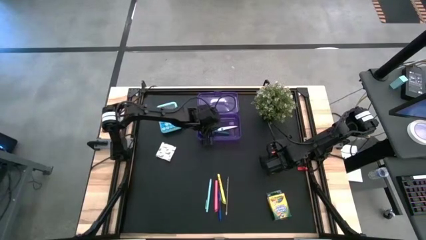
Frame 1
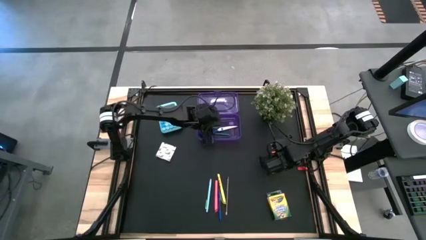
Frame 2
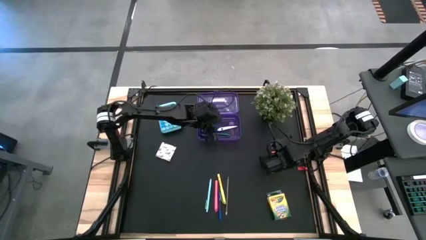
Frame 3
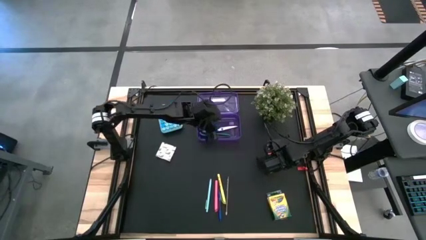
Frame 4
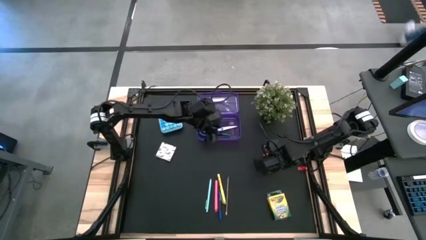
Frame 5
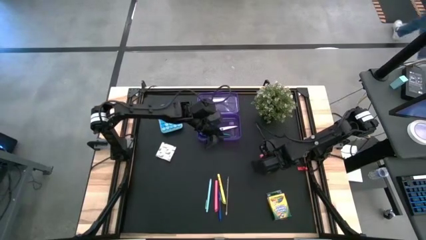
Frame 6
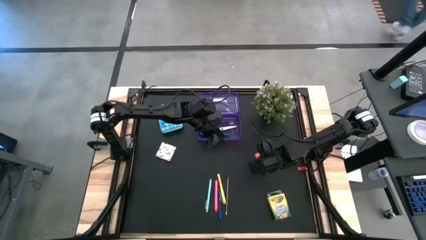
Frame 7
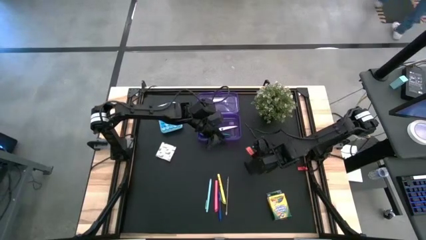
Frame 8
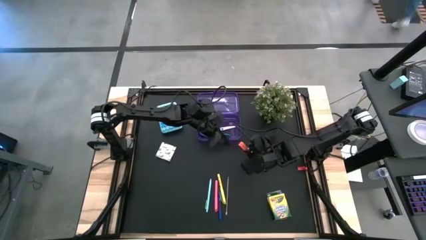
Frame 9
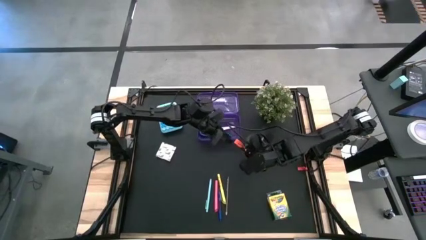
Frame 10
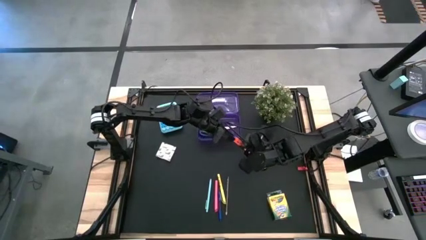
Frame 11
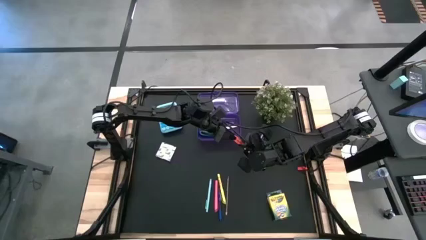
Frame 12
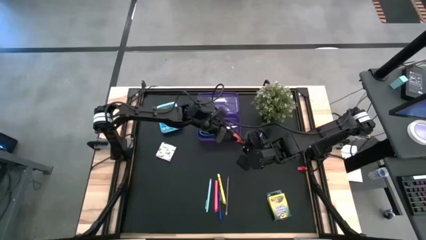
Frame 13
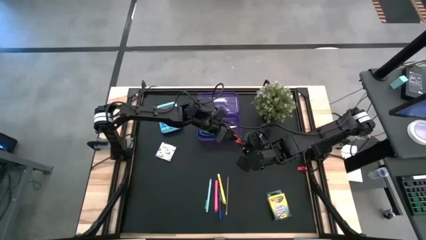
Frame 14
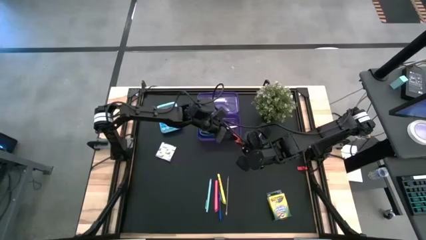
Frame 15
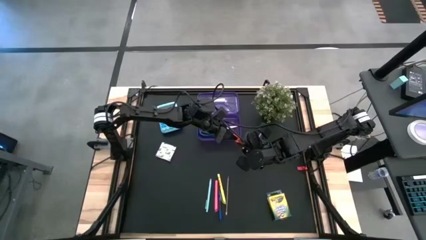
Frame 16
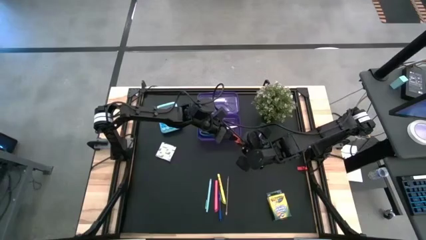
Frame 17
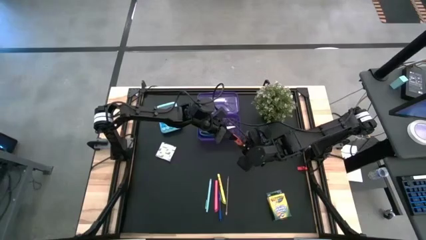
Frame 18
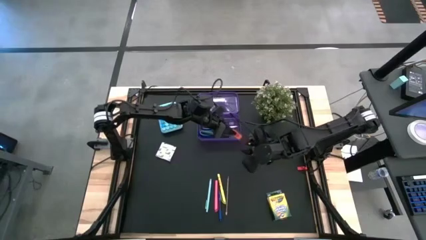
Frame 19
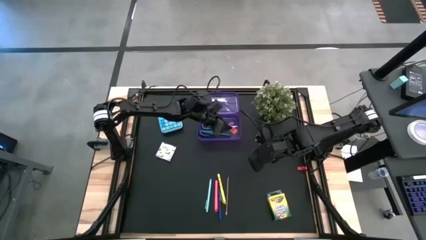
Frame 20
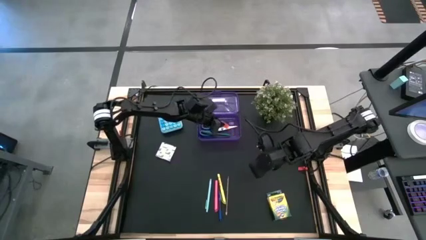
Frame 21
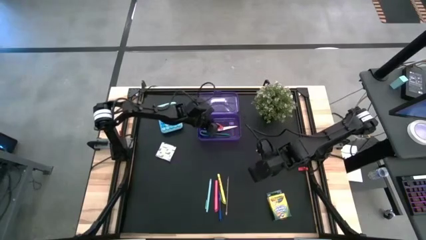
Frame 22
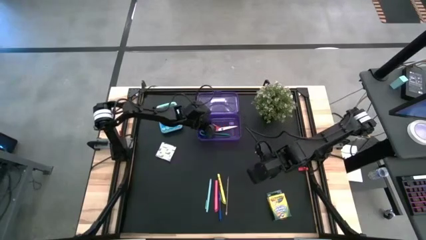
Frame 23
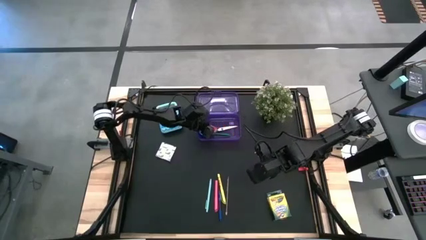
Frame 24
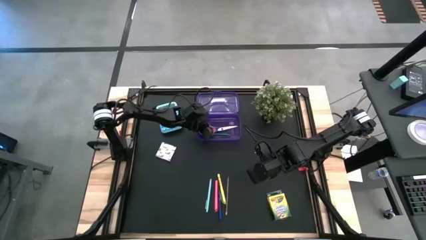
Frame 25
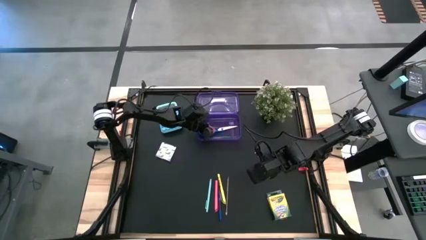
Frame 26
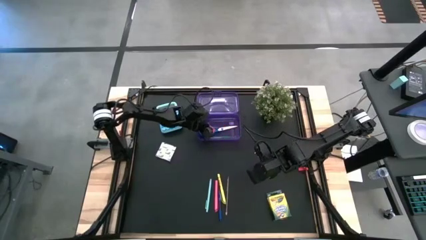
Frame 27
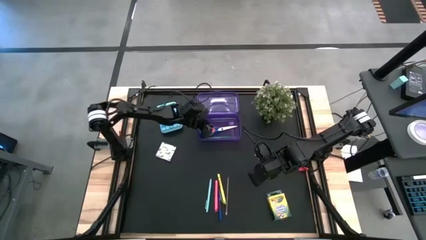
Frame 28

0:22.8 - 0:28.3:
Task: Pack school essentials
Put the orange eraser into the purple supply box

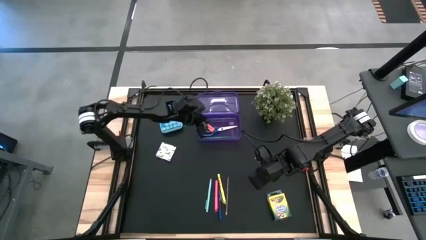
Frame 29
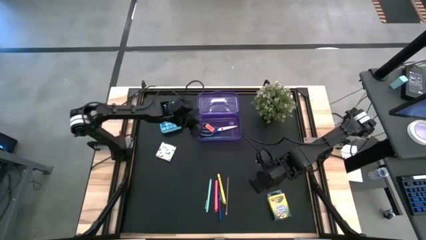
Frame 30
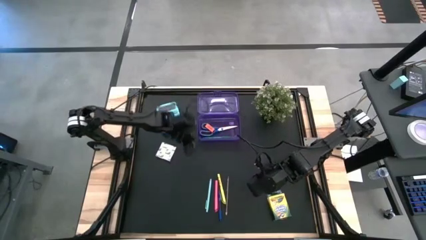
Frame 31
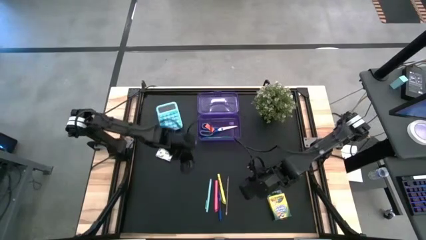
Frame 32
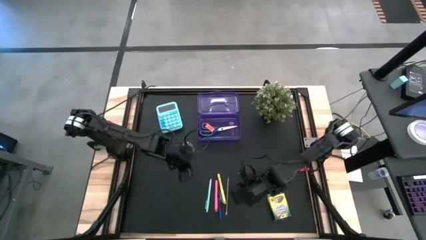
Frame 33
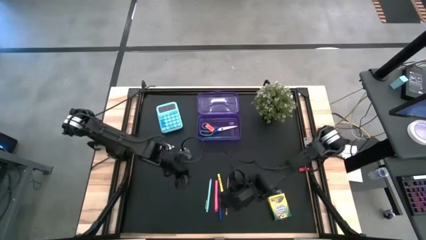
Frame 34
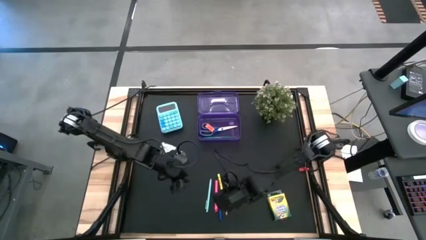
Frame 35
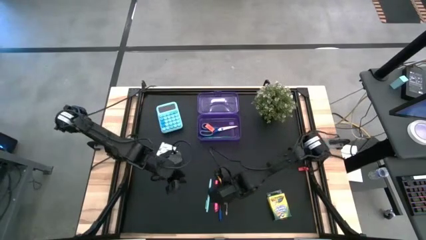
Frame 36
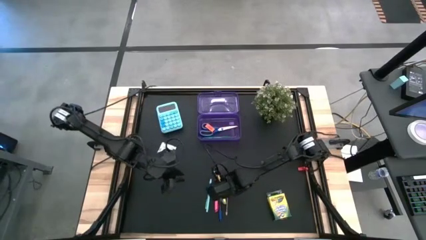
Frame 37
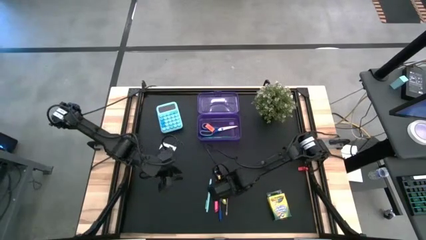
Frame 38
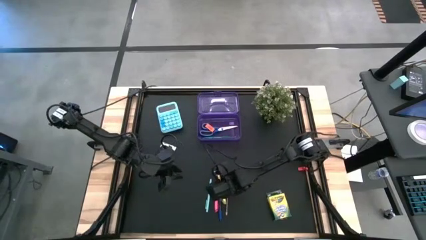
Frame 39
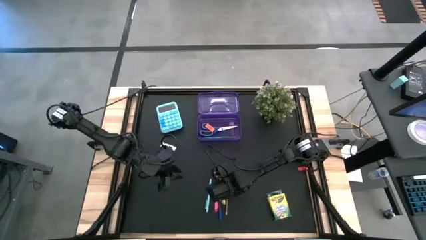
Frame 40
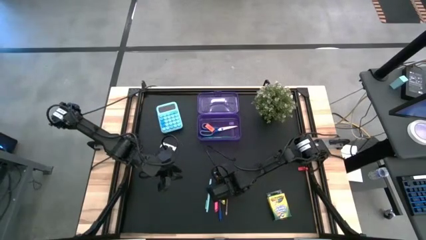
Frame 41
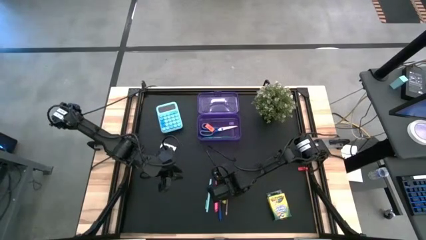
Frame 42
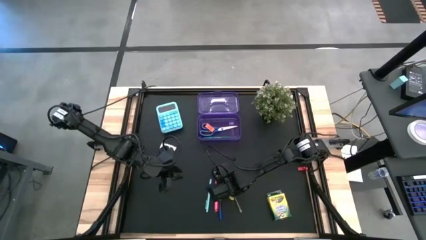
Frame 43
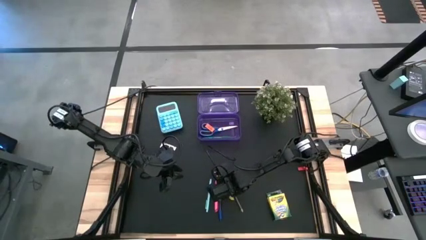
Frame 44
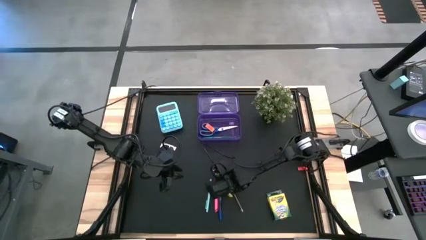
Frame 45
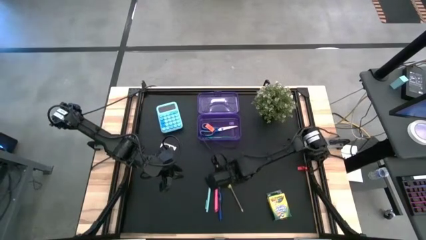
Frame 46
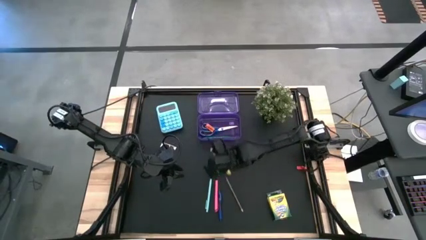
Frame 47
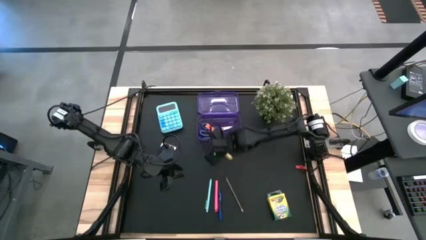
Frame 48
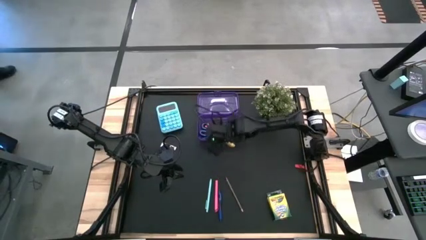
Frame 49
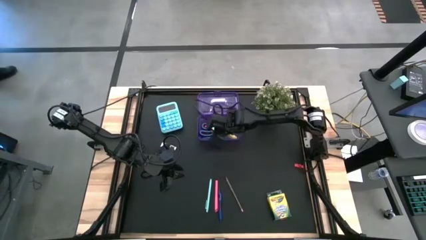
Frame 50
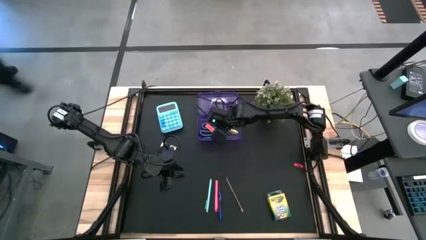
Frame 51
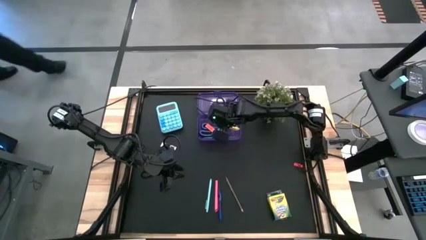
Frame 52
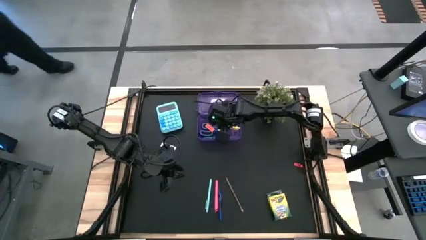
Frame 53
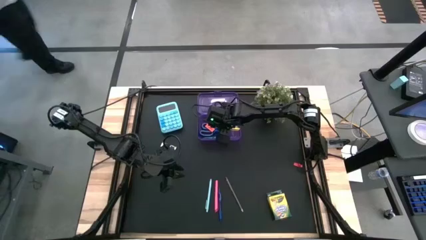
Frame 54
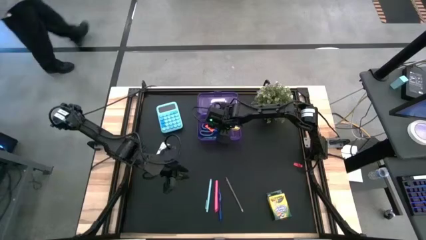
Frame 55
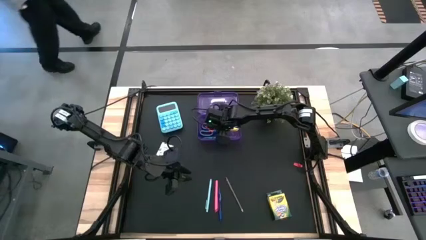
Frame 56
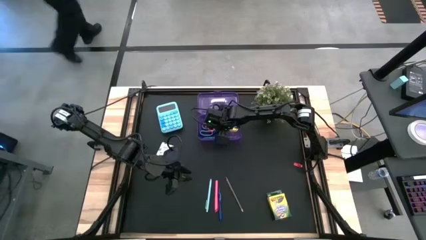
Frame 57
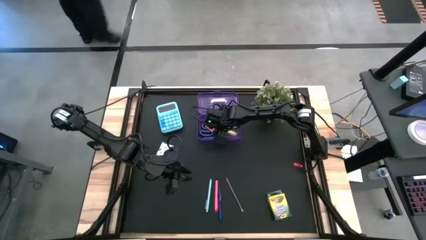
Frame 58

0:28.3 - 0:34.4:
Put the yellow highlighter pen into the purple supply box

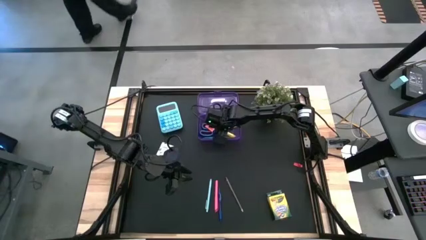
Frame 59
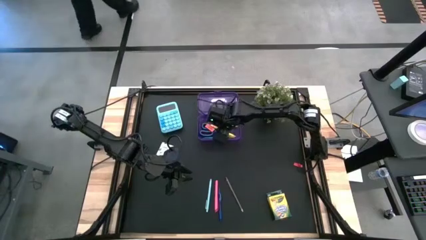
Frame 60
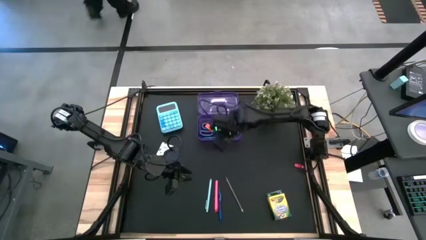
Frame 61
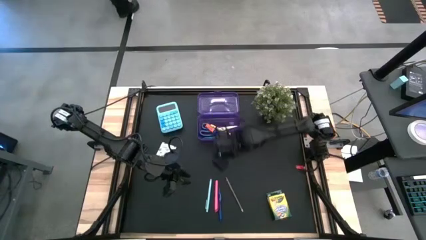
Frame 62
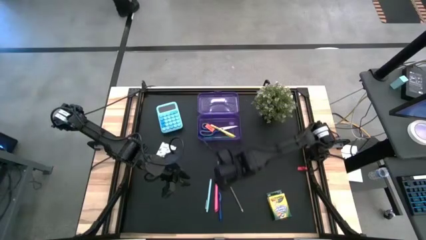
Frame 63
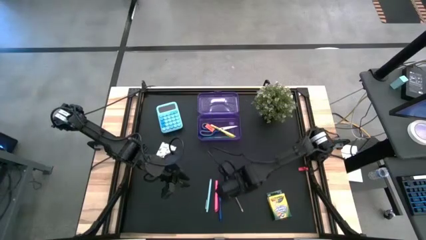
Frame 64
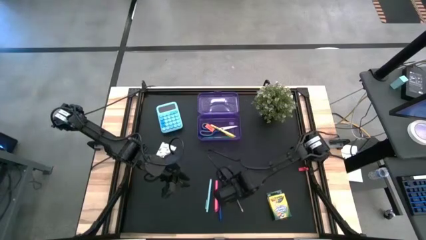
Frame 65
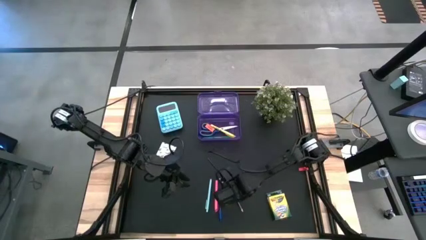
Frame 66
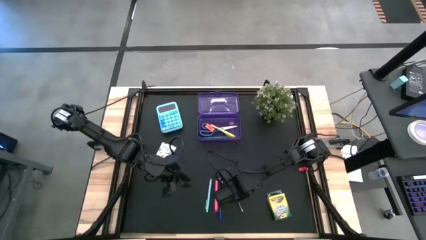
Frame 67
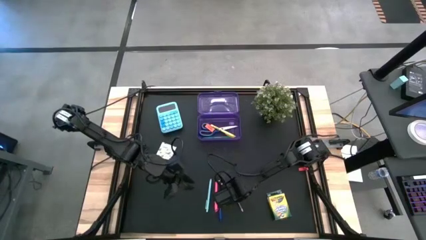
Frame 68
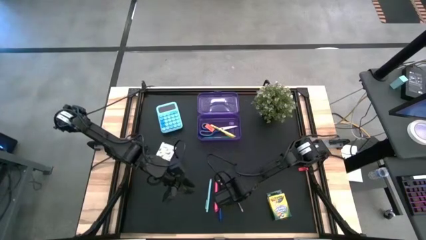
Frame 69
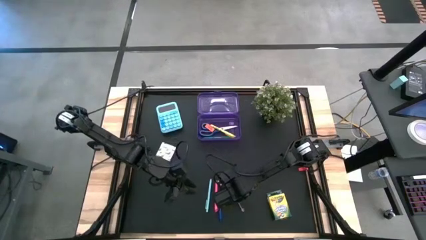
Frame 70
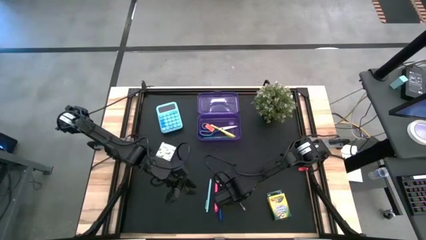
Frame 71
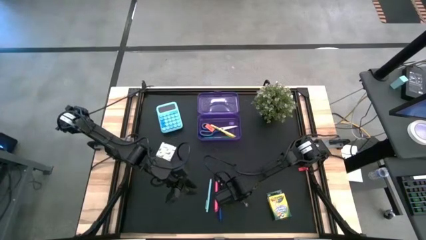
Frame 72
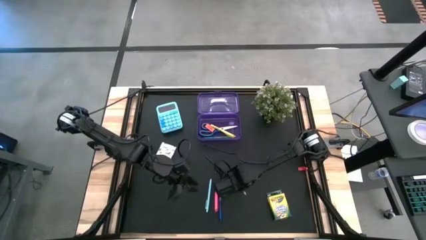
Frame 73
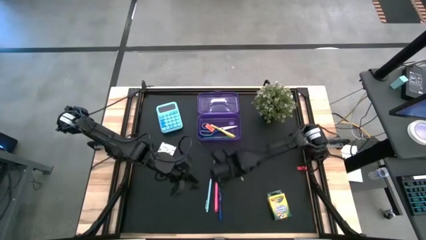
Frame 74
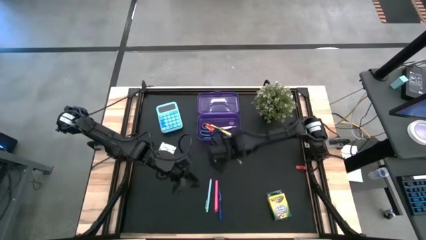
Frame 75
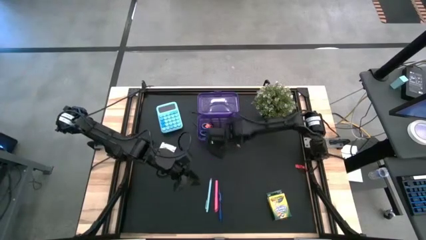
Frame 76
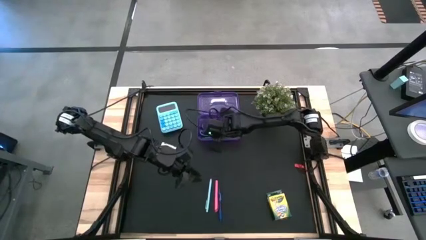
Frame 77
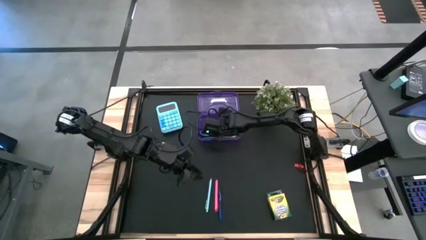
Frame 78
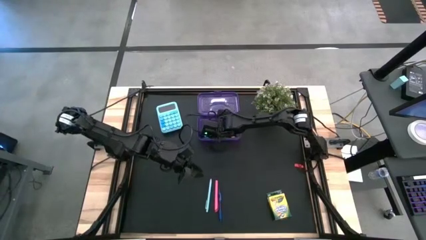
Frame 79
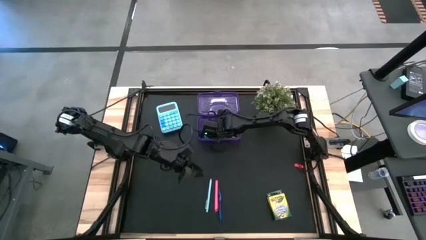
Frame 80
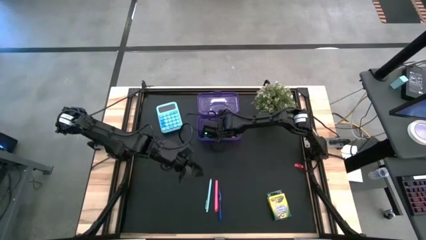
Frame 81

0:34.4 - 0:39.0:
Put the dark blue pencil into the purple supply box
